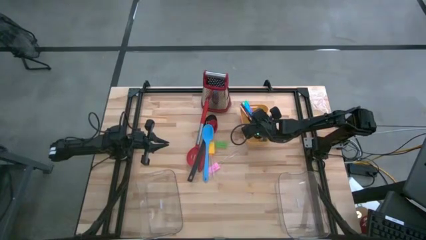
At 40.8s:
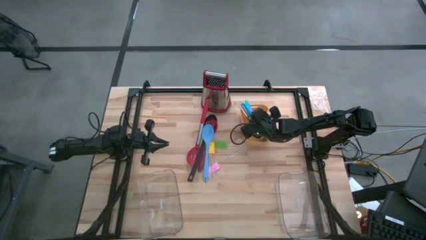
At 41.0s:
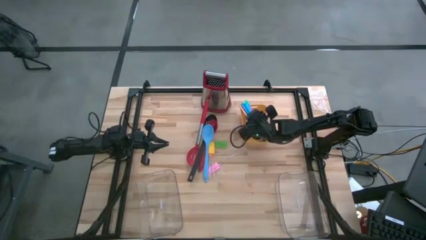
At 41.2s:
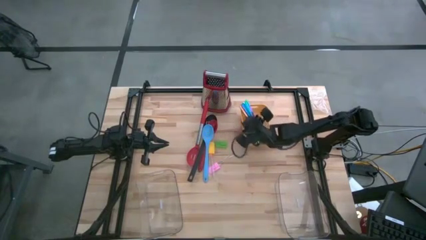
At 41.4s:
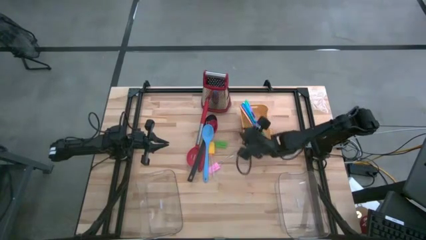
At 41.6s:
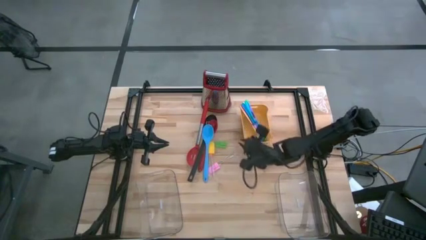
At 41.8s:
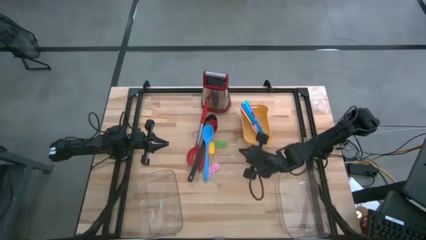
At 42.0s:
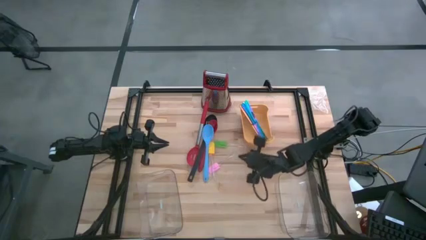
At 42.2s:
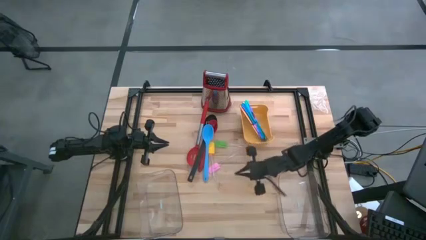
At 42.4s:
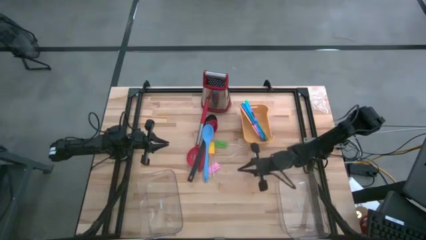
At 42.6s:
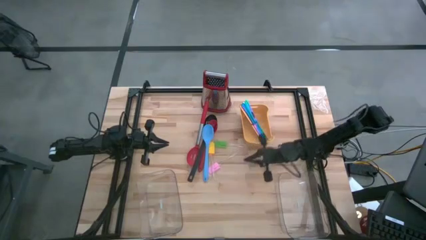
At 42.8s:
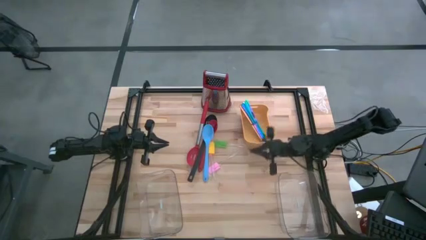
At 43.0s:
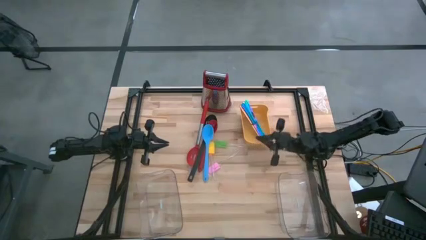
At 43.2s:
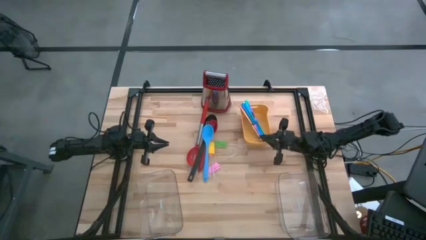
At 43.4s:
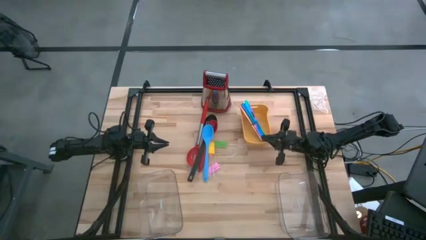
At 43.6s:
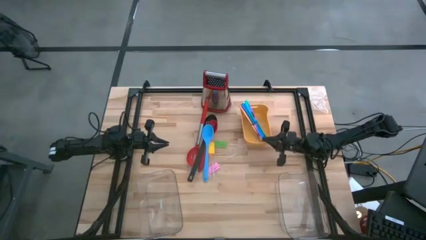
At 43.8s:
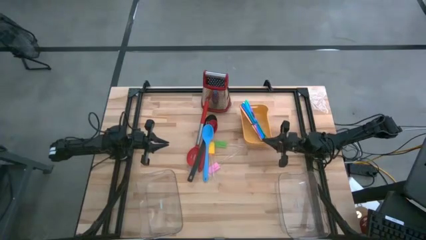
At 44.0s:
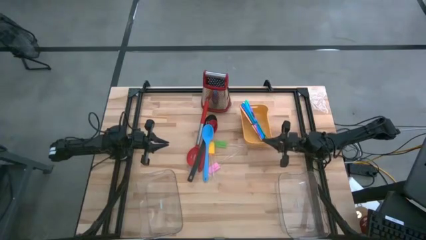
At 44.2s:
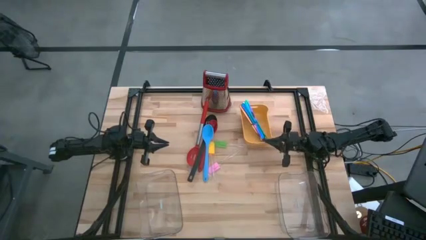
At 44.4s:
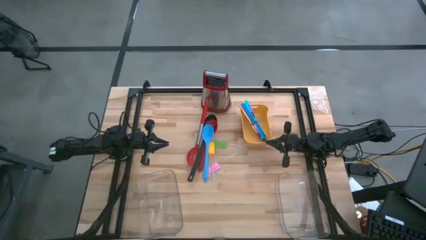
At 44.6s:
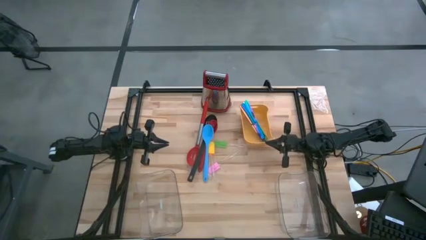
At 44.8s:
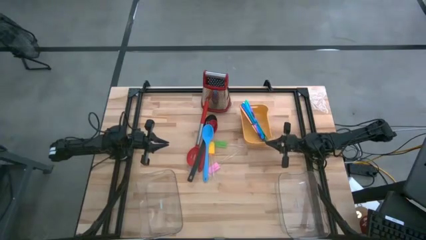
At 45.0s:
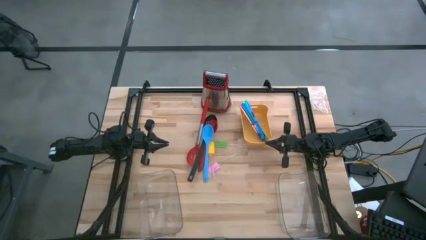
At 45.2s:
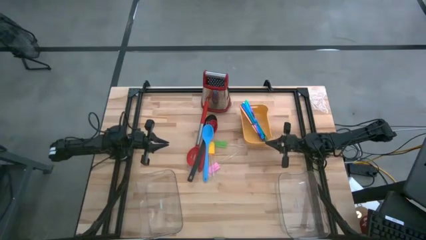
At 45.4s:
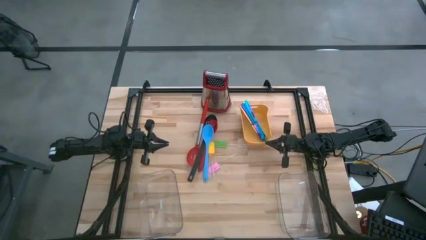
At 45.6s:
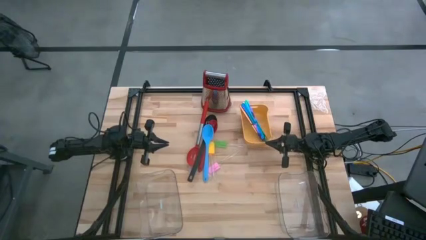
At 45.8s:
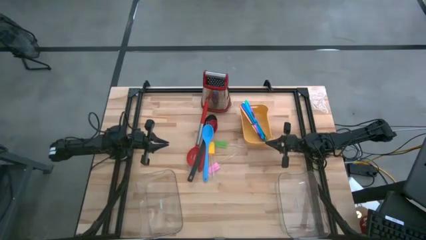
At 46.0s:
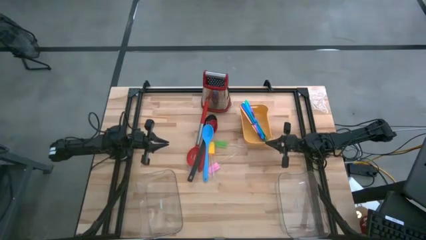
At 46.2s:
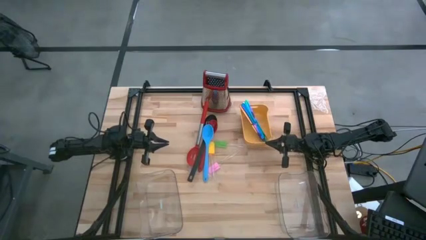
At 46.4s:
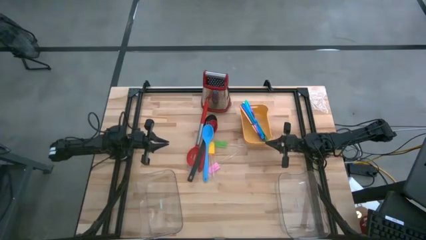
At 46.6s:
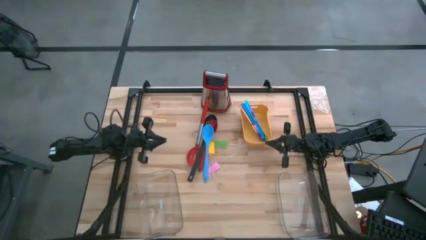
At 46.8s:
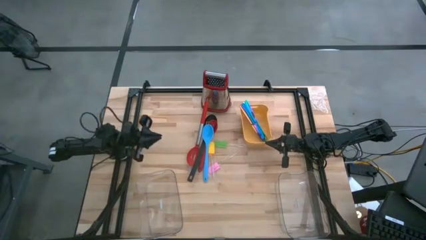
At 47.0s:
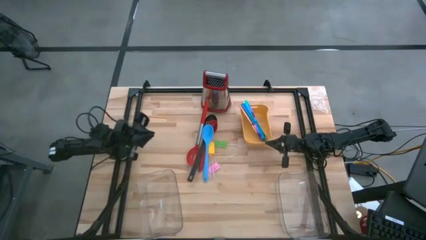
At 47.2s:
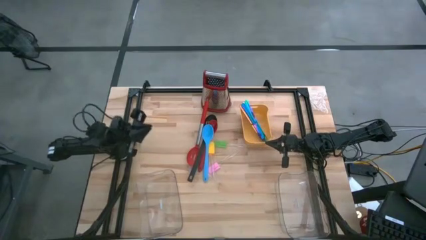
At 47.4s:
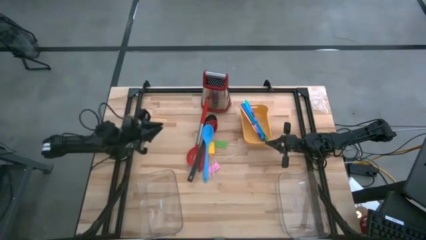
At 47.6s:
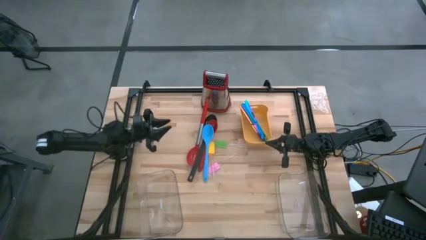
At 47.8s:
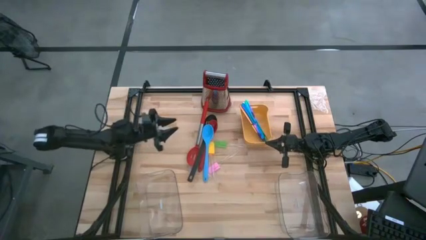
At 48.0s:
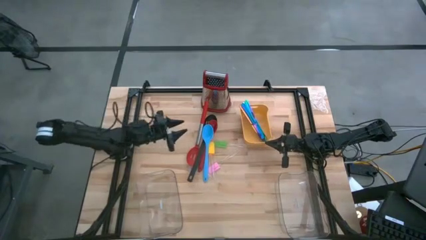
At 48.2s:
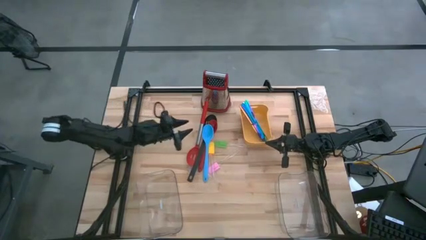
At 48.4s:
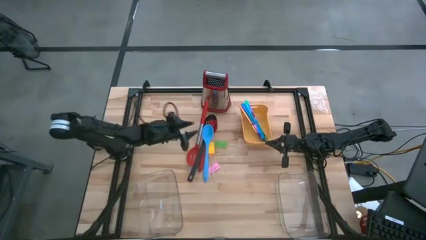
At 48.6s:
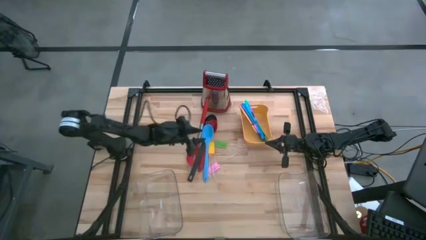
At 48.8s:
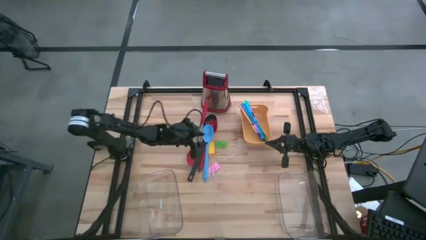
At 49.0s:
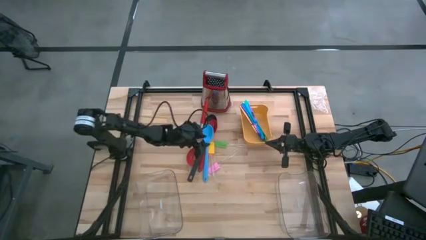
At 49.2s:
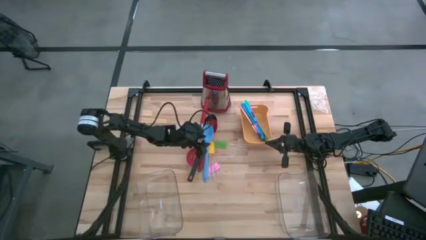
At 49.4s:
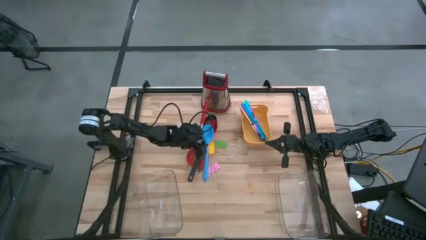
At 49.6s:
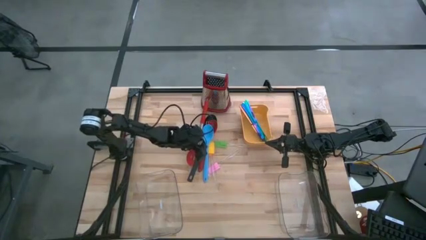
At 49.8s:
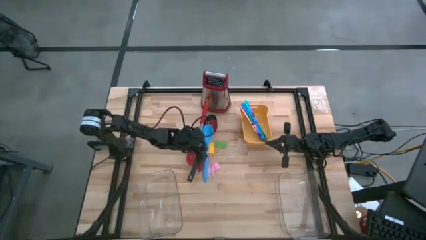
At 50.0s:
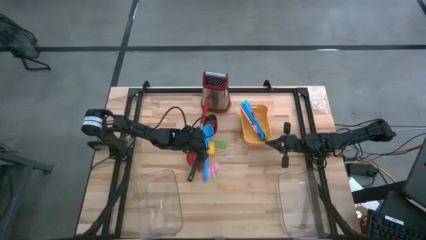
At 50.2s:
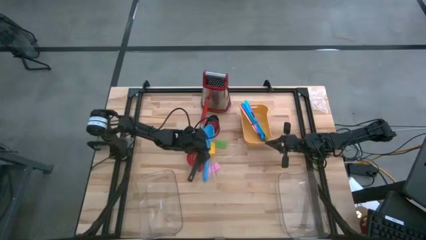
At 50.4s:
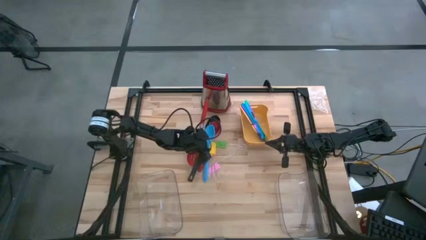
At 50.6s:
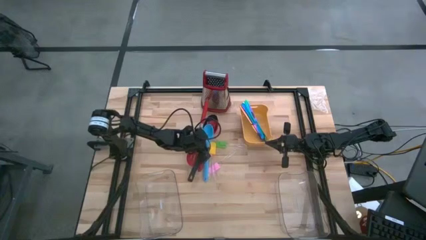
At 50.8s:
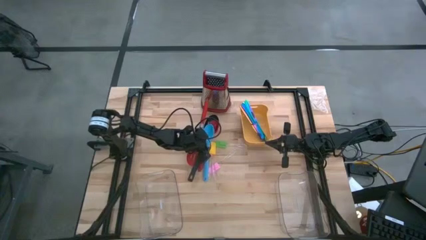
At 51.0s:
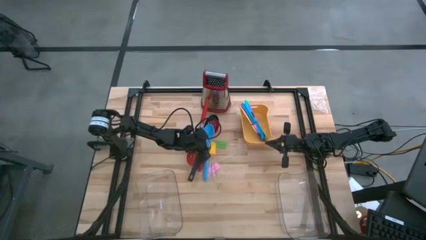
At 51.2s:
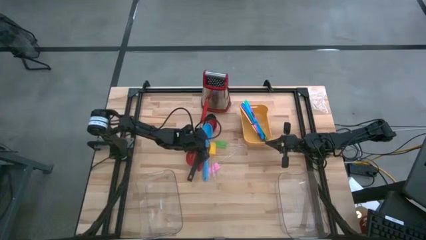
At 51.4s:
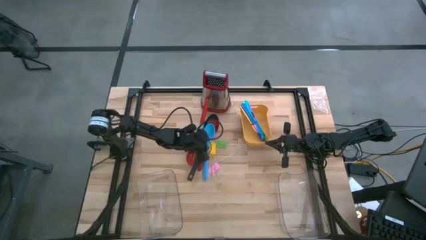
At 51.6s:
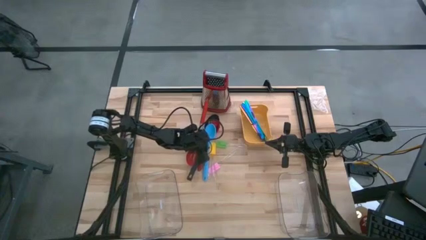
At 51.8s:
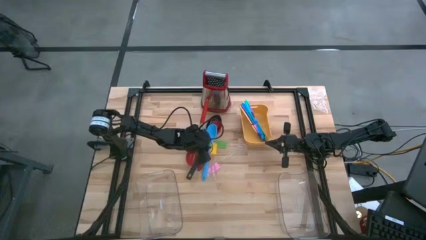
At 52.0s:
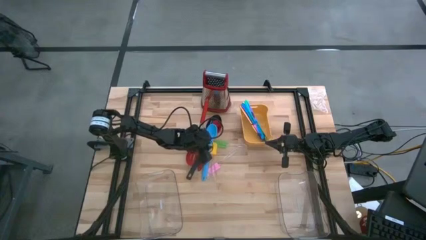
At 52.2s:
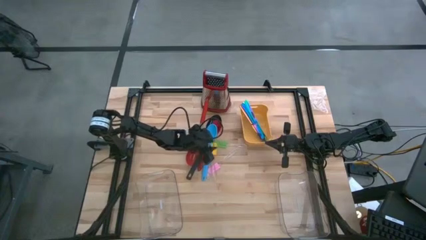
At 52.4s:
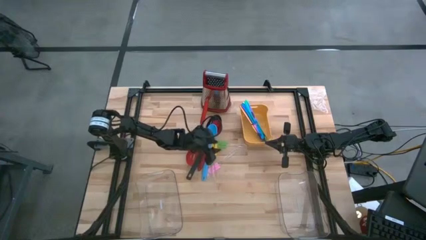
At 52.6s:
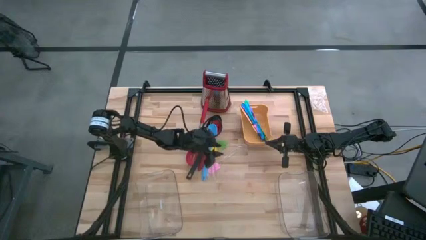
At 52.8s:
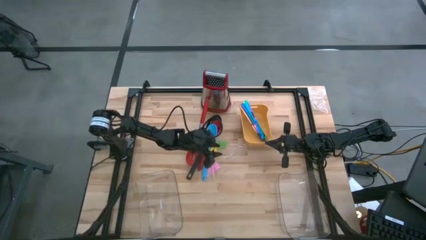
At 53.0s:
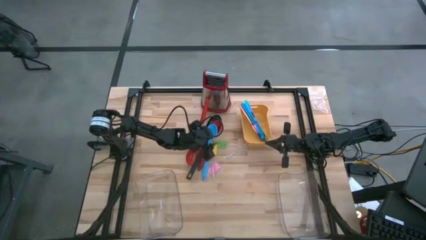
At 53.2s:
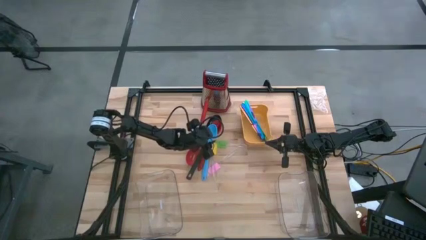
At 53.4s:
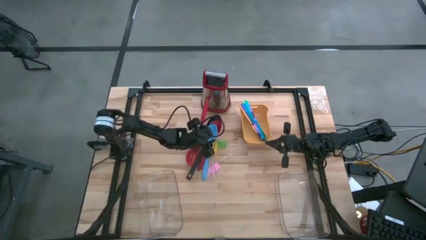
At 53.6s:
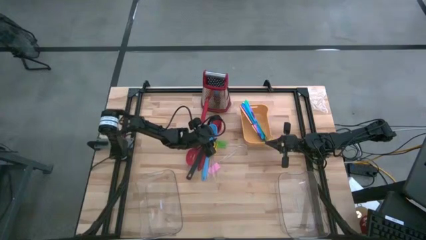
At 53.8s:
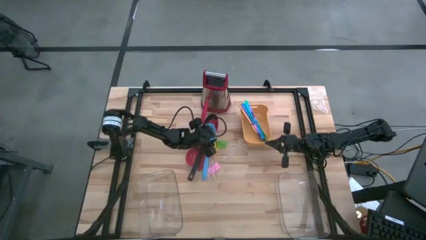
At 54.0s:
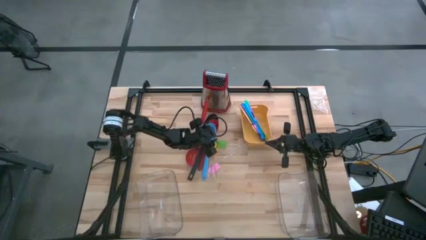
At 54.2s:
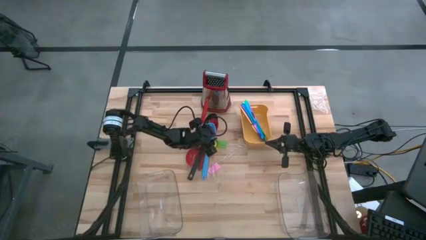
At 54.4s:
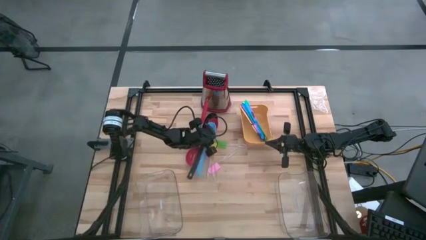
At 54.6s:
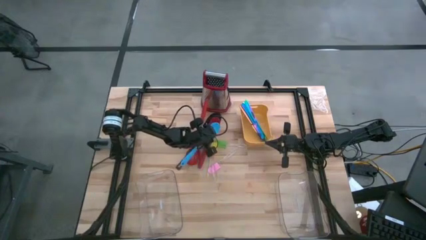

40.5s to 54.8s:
Task: Pick & Place Kitchen Items
Put the blue serving spoon into the right transparent bin

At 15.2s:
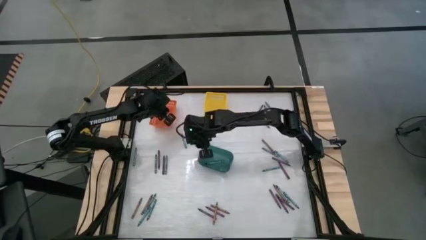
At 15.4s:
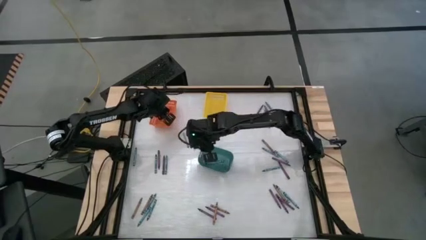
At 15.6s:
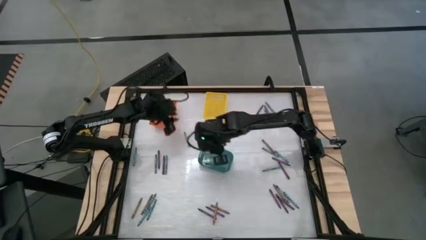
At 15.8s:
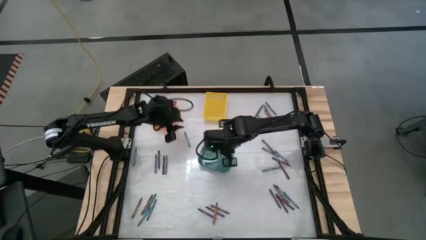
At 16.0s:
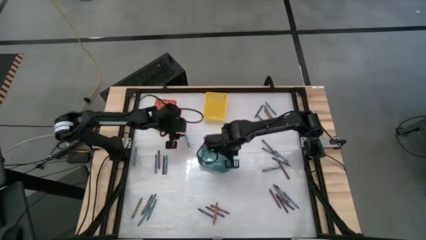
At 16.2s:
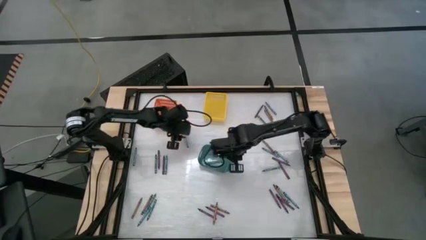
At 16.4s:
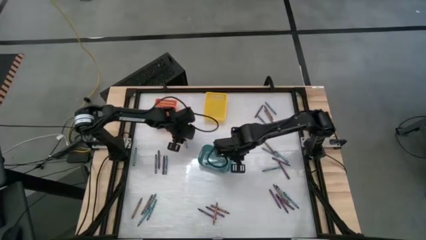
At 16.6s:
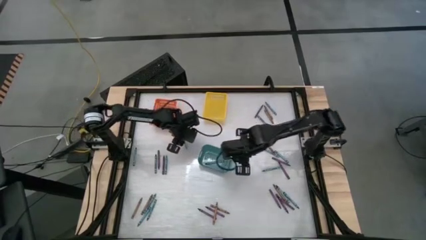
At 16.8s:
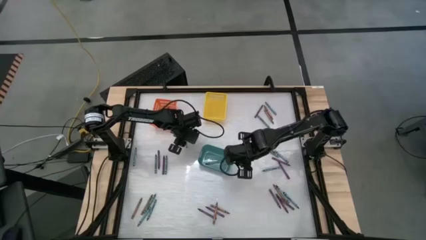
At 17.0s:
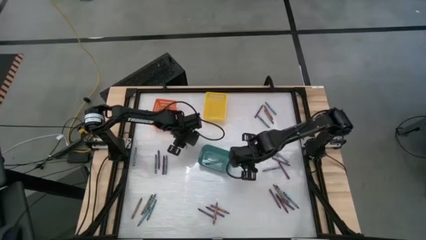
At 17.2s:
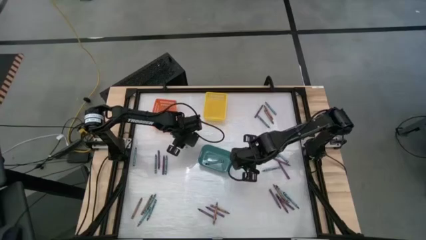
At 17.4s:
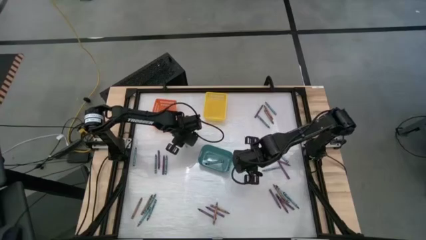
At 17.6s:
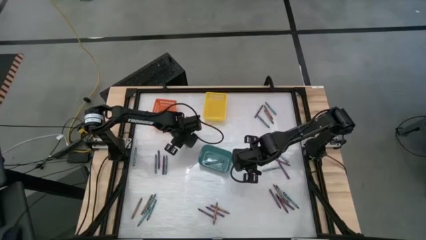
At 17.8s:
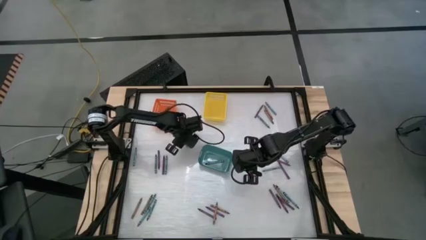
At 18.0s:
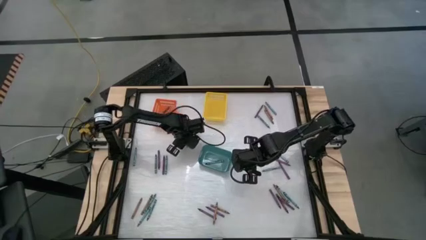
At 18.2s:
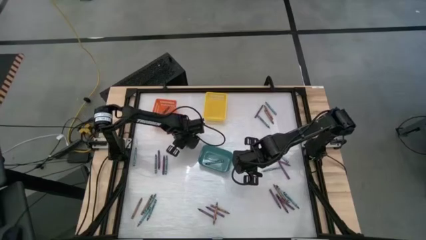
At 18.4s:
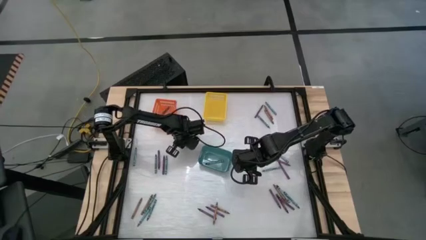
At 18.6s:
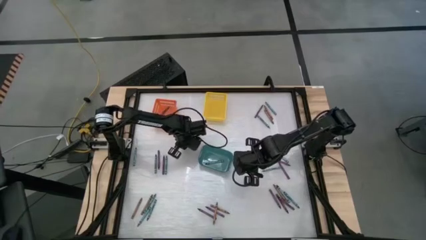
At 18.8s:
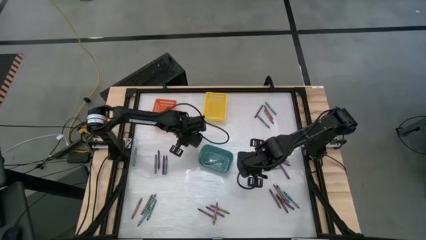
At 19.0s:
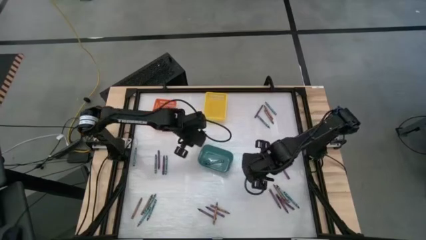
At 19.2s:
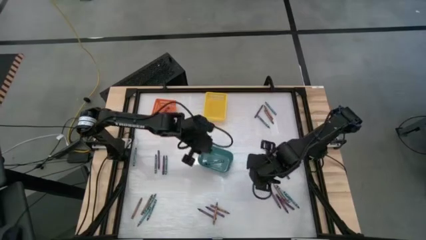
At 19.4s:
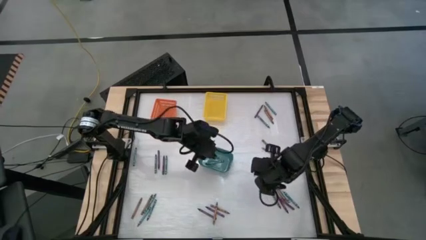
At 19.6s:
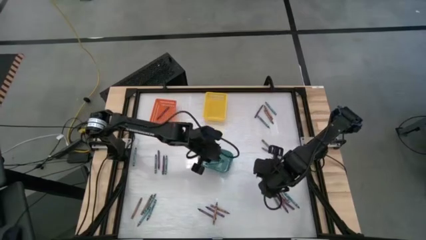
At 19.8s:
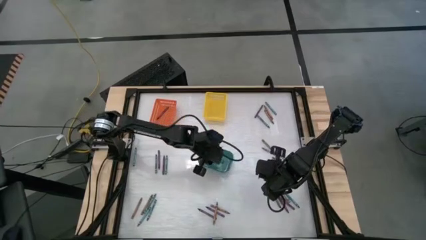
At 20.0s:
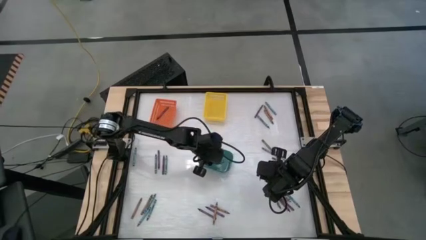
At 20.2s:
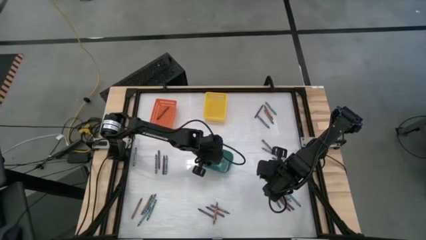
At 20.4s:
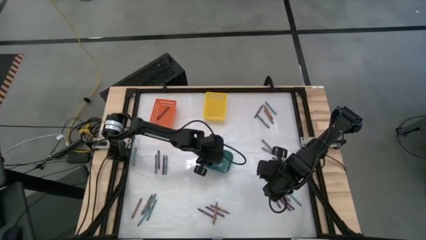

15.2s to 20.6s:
Task: Sort crayons
Put the blue crayon into the blue bin
